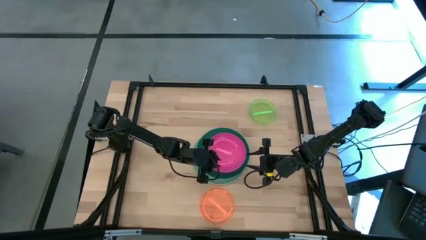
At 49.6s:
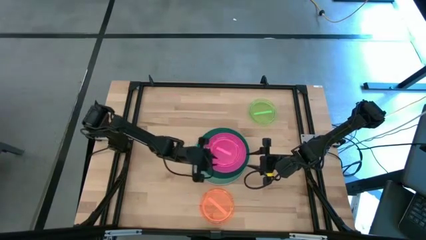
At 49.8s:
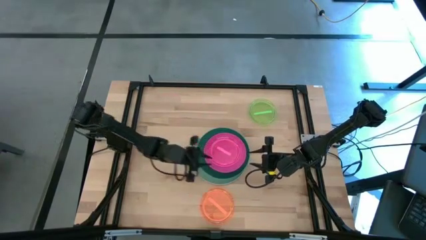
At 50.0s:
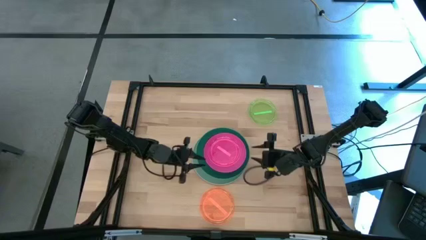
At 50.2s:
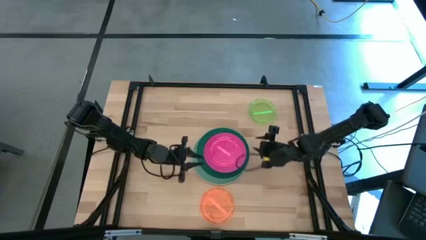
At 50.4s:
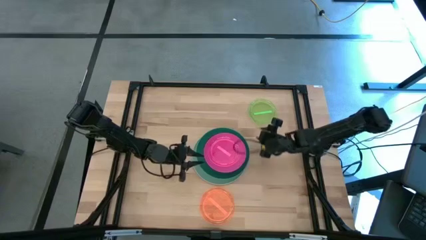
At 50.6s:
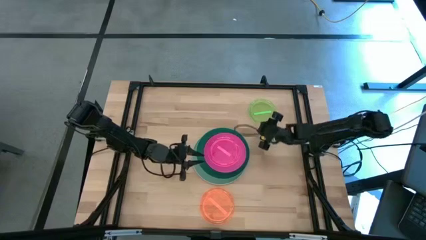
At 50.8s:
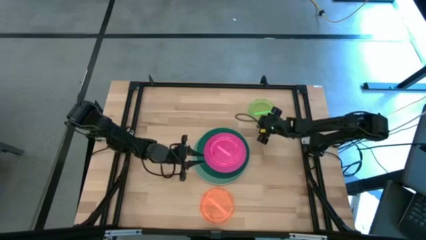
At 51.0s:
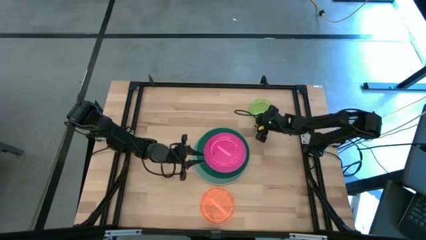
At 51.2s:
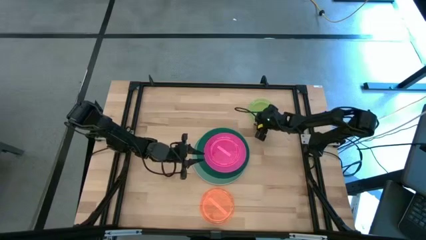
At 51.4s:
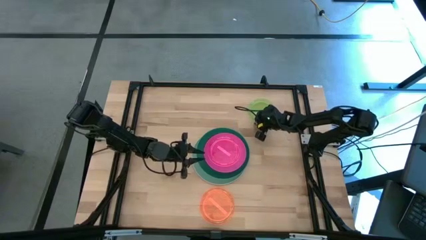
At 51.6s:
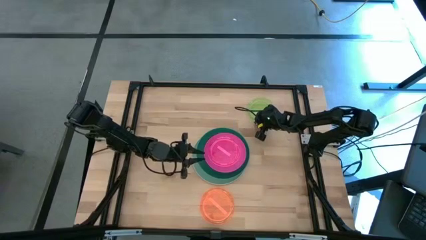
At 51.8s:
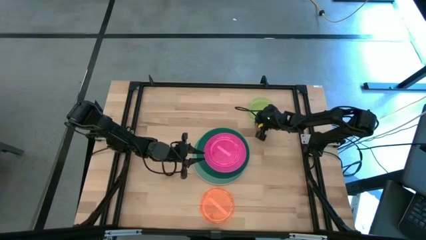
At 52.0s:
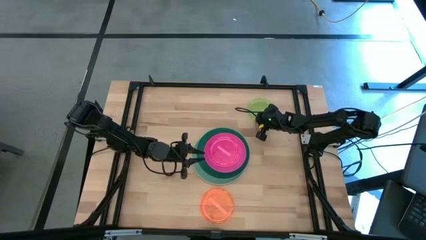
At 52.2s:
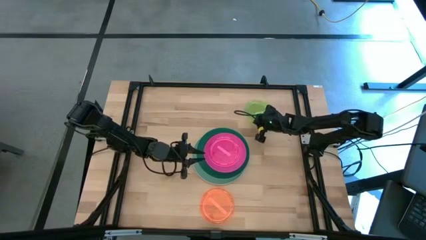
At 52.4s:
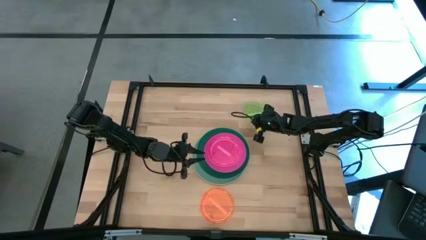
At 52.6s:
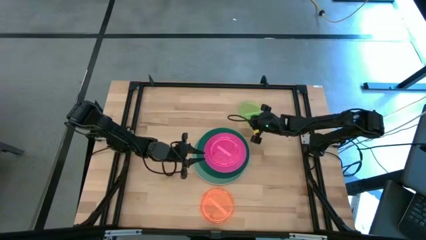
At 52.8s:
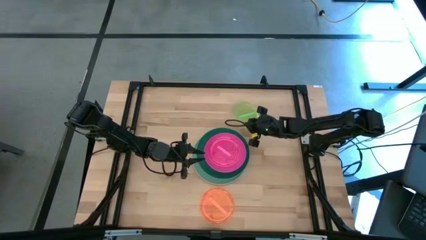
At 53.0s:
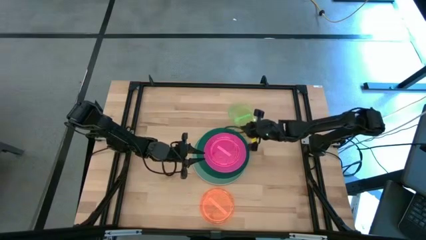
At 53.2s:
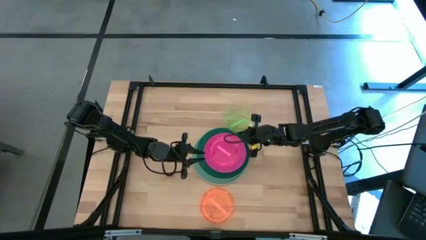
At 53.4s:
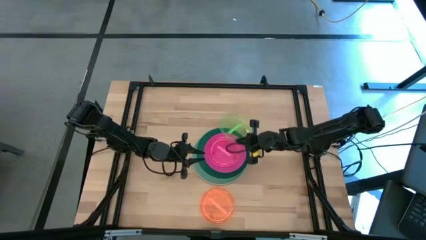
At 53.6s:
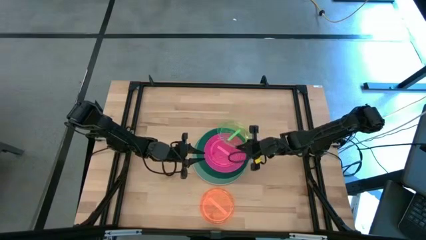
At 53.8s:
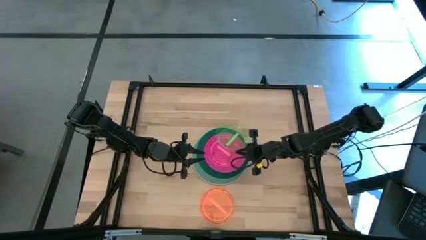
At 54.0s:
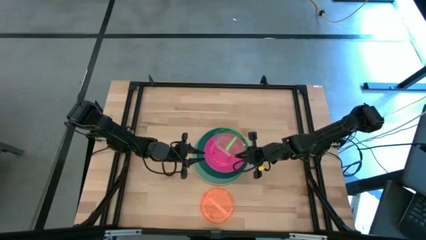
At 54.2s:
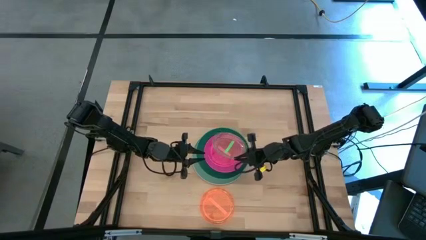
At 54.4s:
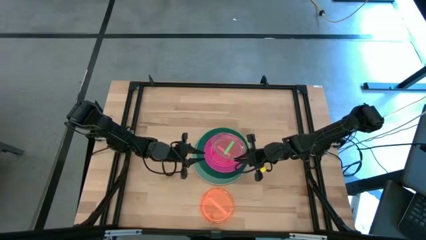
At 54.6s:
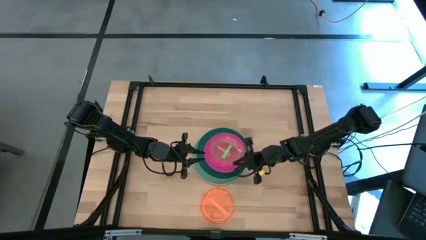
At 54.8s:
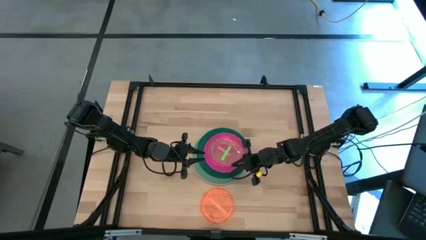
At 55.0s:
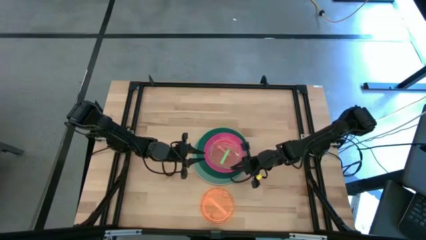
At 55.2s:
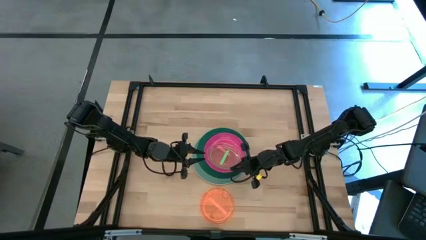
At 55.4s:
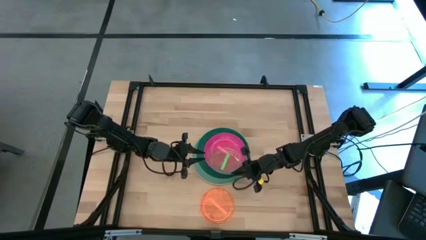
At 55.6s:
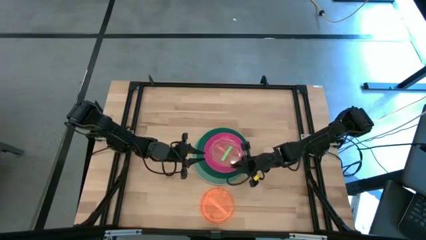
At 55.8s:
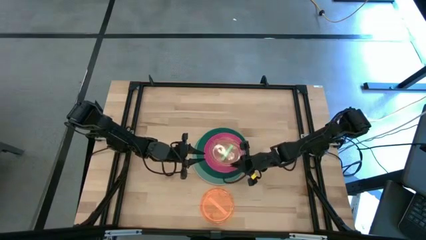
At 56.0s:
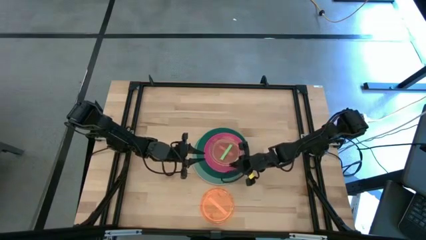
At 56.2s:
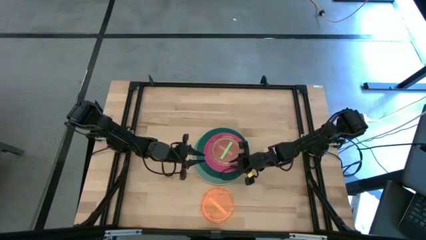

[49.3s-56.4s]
Task: Stack plastic plates
Stack the light green plate on top of the light pink plate

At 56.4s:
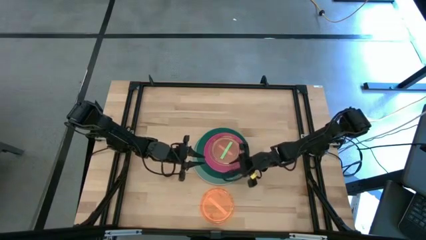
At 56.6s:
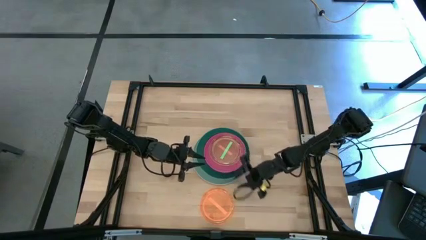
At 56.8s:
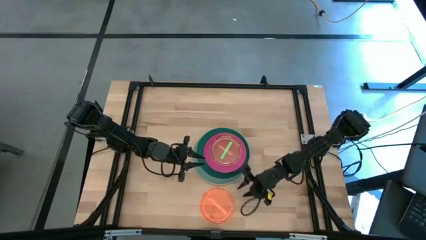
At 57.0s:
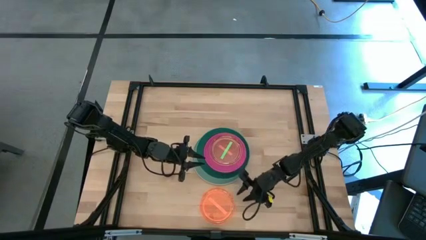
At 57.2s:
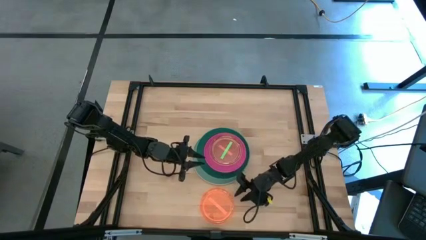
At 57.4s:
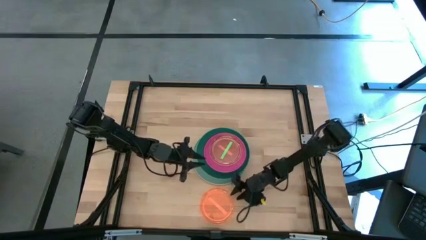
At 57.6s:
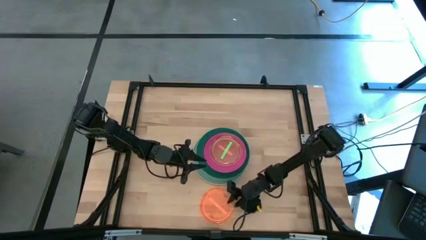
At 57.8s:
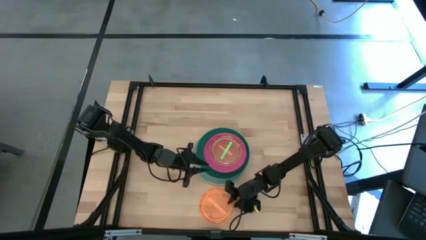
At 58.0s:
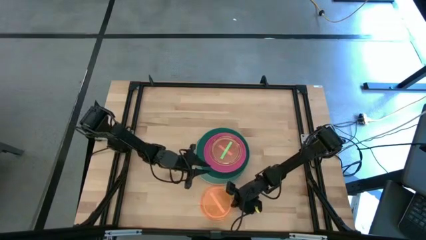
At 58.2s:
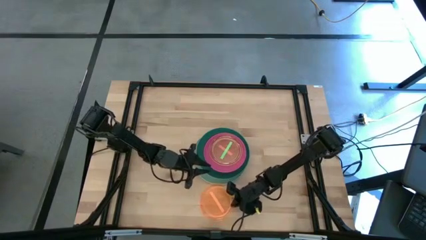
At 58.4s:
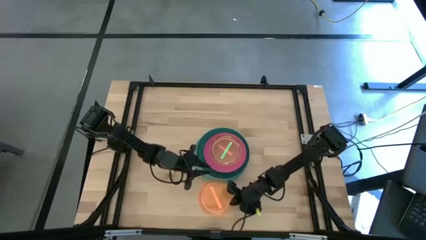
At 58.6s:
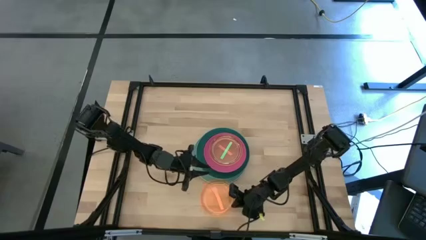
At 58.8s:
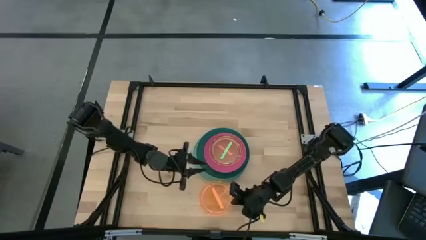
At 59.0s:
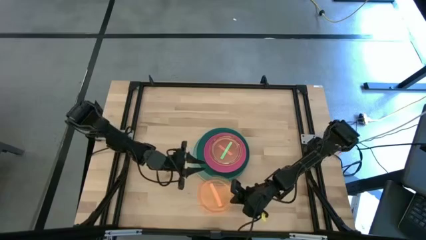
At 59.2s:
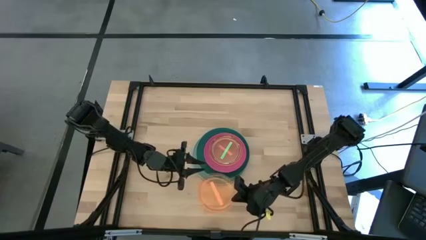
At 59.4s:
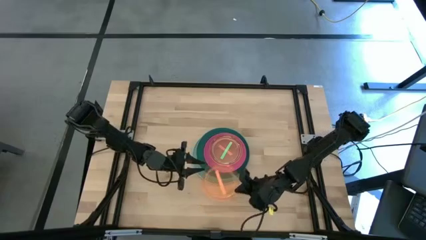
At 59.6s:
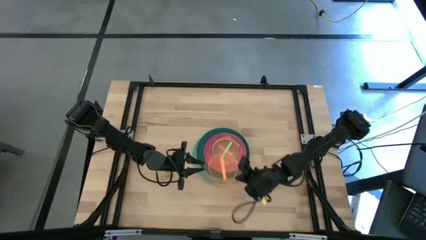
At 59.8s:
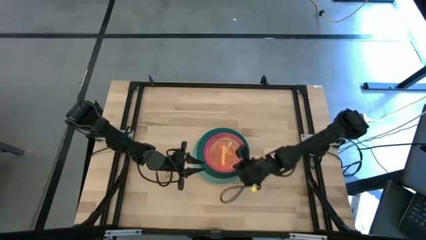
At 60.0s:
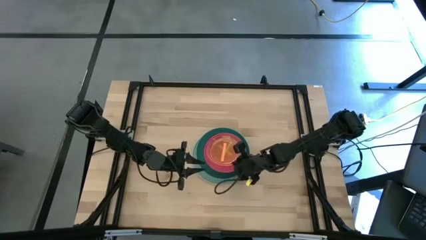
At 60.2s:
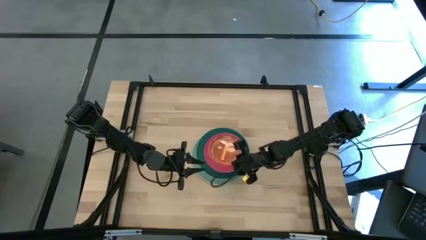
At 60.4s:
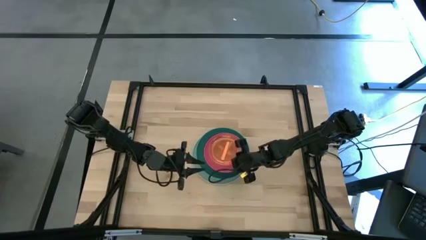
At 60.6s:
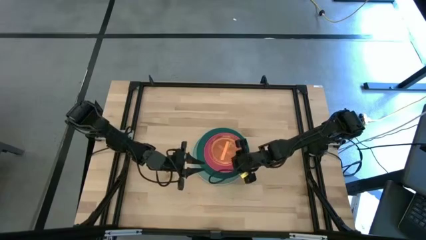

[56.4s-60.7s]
Stack the orange plate on top of the light green plate

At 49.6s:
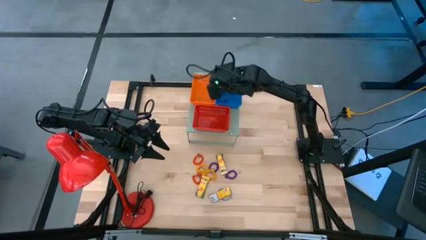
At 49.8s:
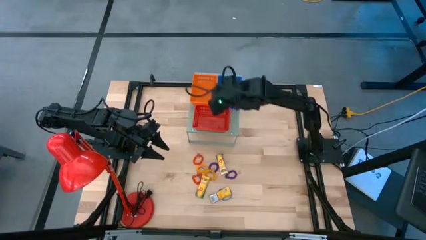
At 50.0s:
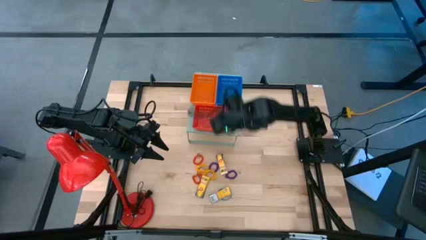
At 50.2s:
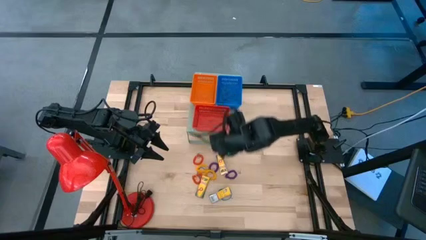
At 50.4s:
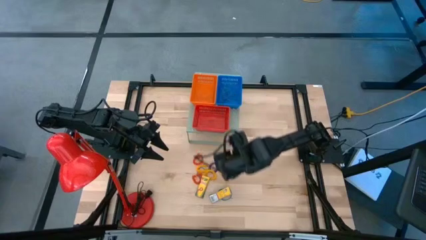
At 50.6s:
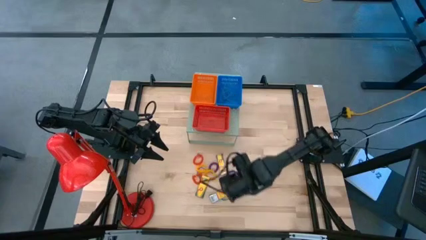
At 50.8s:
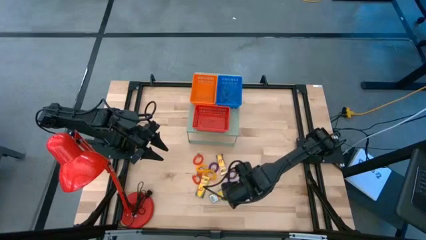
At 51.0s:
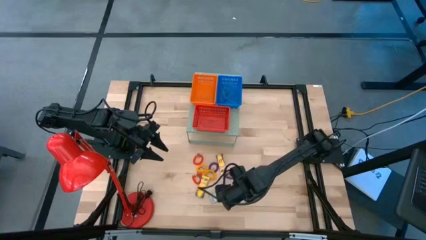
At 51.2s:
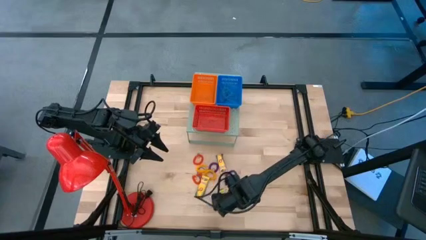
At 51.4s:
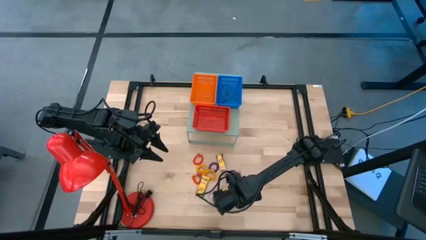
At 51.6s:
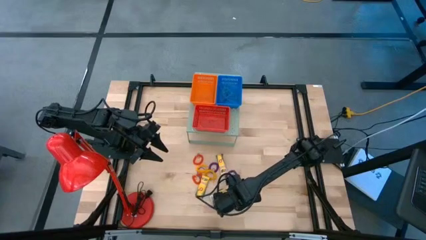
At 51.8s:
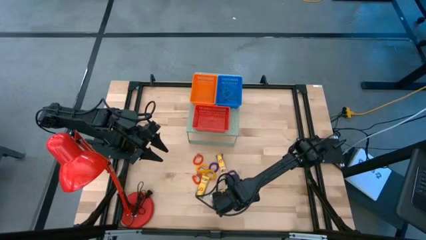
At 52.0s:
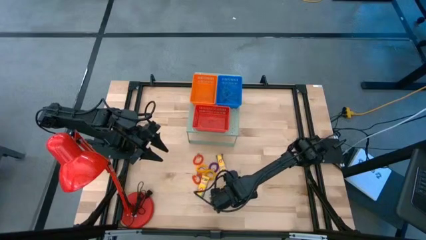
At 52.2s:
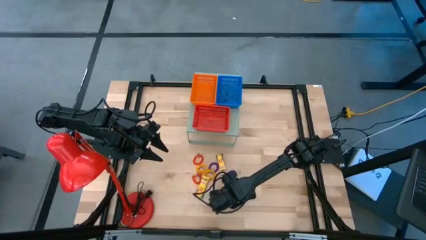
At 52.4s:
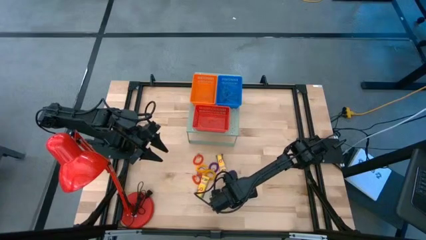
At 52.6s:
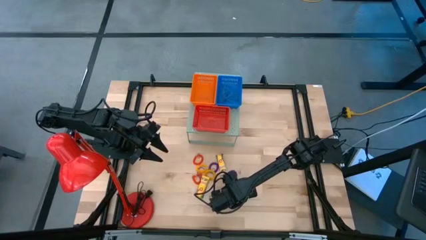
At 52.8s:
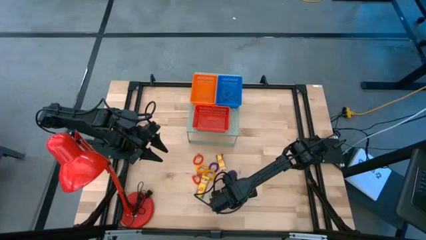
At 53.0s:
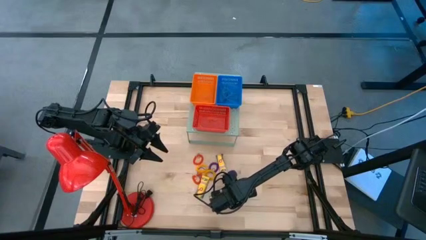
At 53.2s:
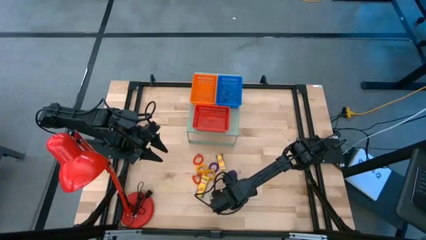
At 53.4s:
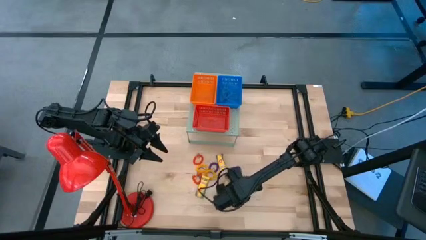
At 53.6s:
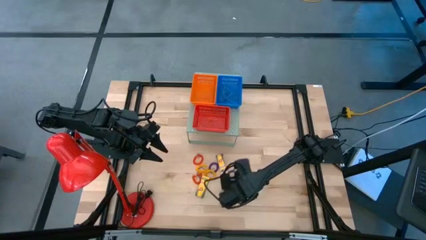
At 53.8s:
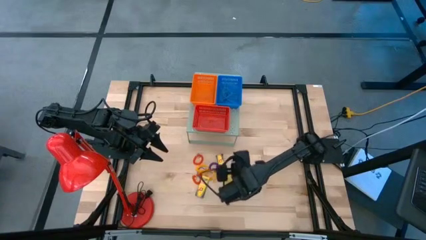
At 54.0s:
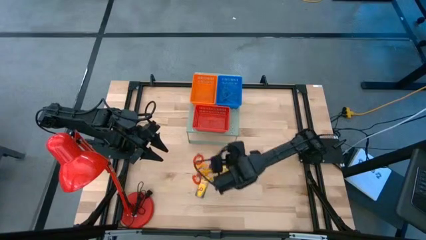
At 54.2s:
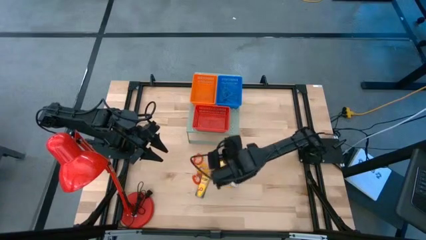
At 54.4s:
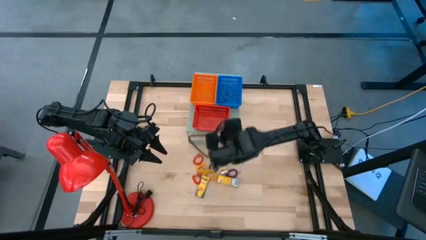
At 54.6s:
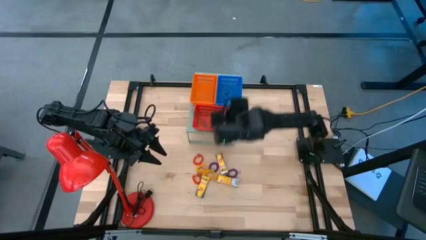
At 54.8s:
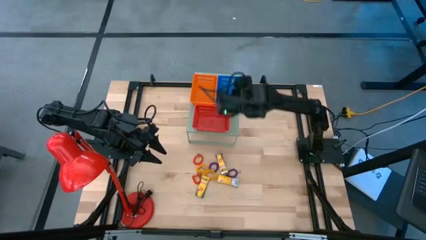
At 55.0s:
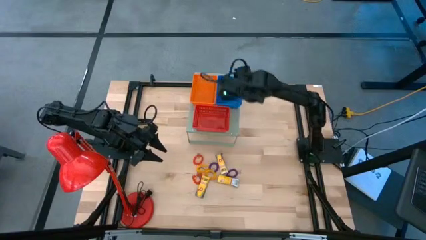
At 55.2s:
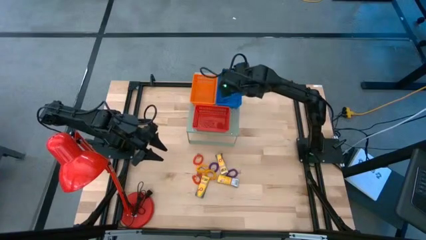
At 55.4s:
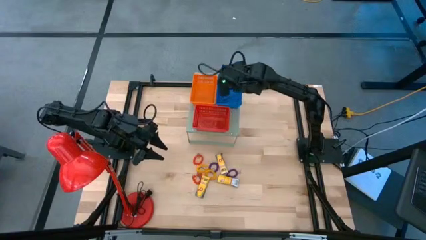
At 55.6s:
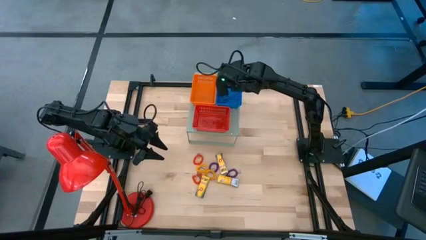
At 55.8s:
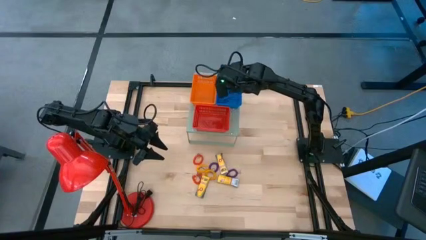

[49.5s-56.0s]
Task: Pick & Place Office Desk Supplies
Put the blue rubber band into the blue bin
